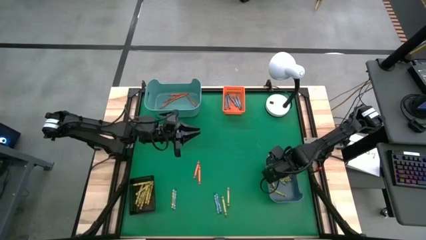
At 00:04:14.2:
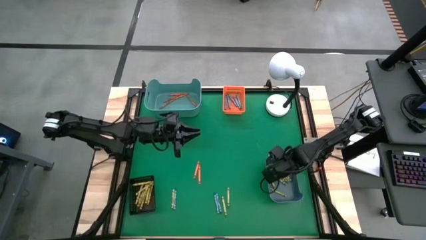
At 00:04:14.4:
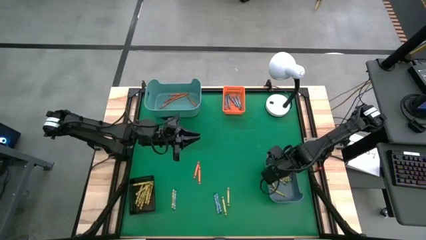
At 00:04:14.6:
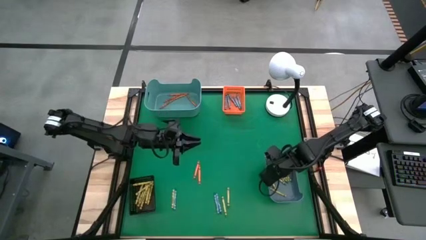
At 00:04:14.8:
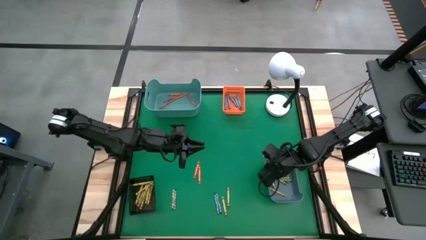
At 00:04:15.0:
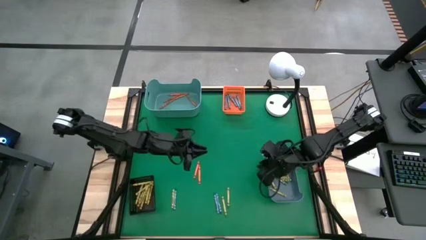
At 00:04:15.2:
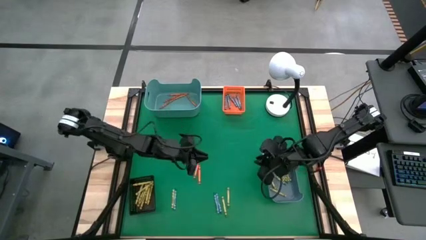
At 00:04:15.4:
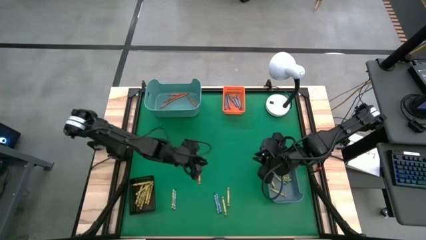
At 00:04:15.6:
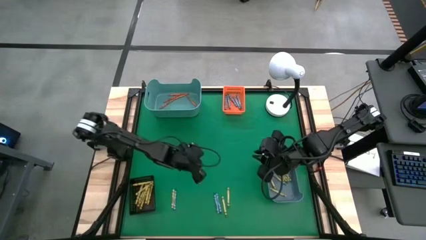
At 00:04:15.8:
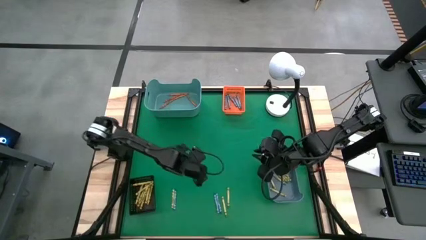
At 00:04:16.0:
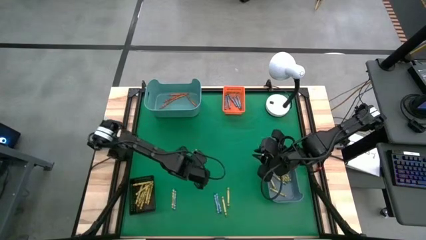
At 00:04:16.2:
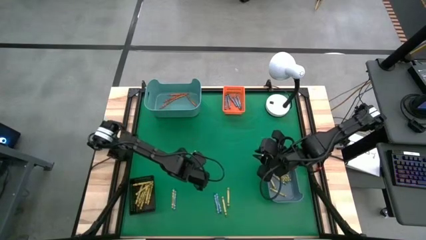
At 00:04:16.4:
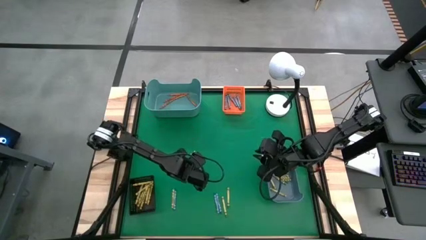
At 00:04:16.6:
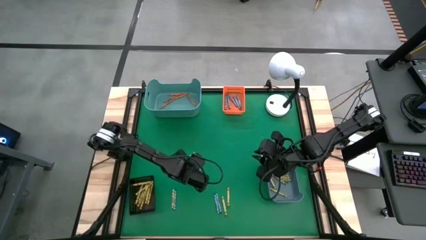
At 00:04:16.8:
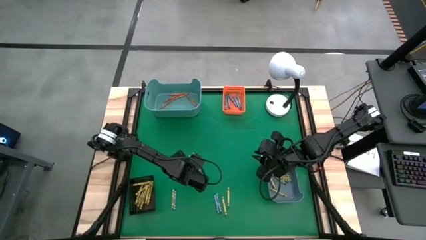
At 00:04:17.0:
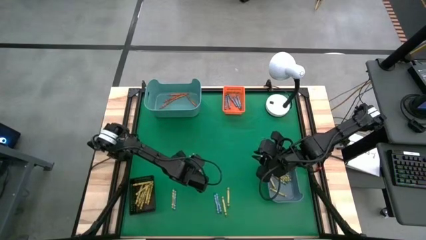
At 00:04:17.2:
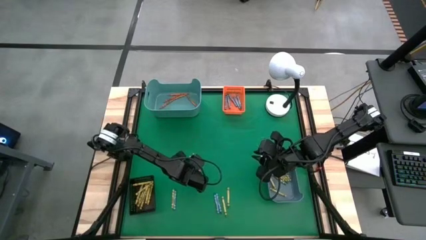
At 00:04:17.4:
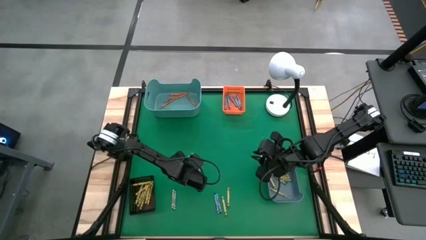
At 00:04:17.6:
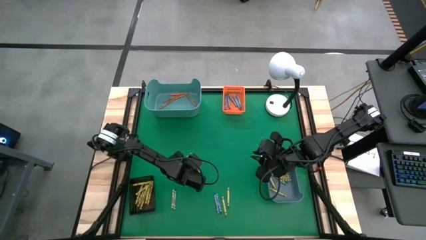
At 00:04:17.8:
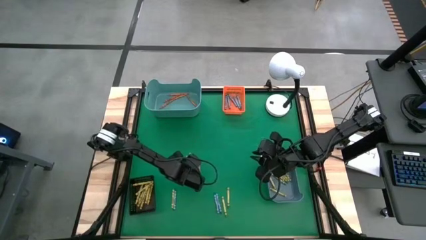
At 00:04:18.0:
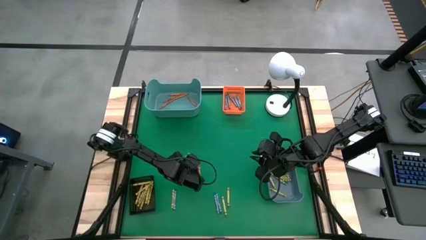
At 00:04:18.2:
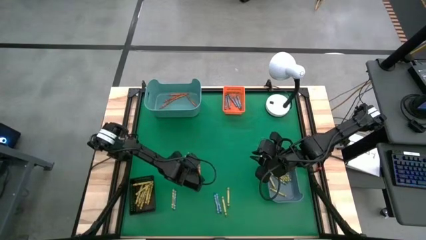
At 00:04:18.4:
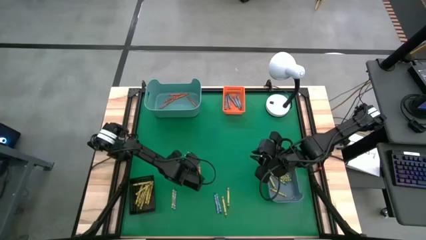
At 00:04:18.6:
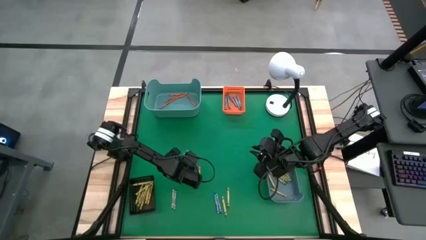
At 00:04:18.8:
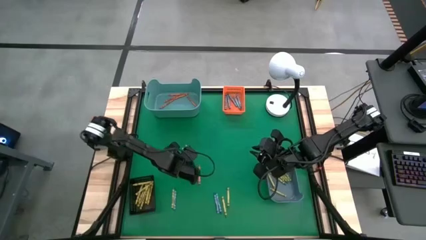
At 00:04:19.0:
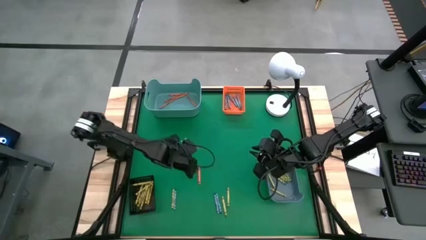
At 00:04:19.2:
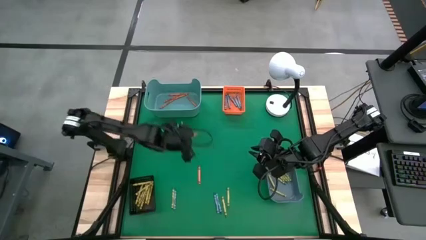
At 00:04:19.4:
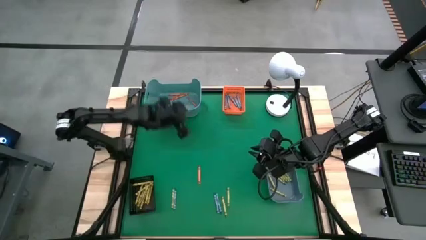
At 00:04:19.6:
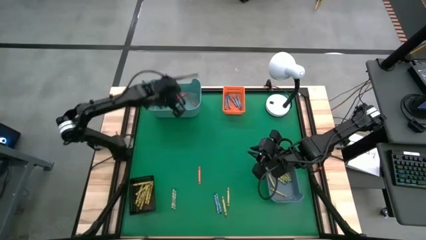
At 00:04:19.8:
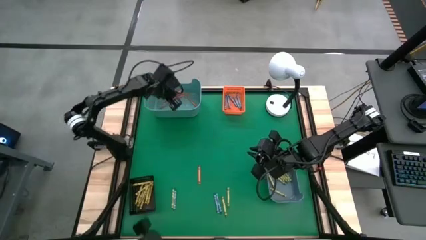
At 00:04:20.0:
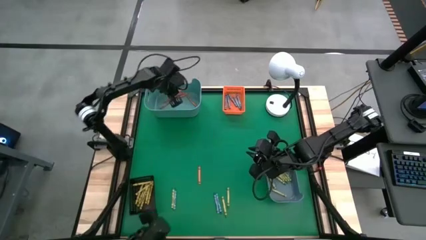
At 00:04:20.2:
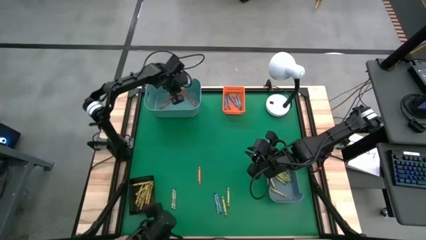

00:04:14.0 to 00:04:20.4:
Task: Sort crayons
Put the orange crayon into the green bin

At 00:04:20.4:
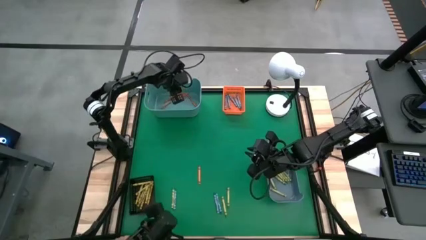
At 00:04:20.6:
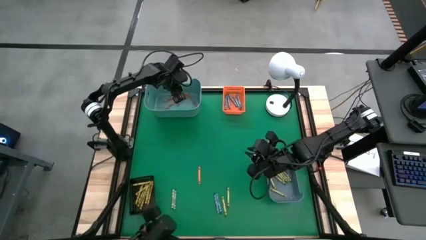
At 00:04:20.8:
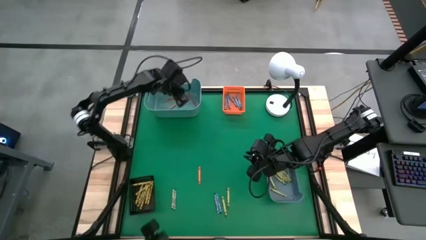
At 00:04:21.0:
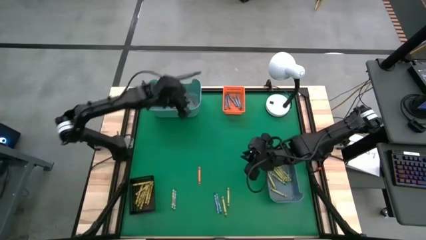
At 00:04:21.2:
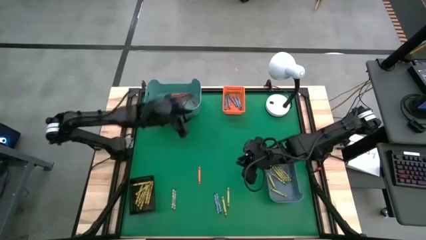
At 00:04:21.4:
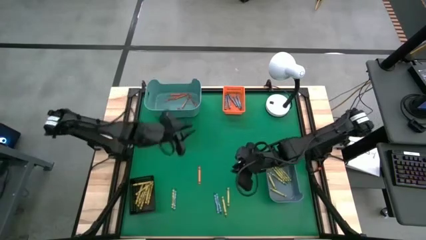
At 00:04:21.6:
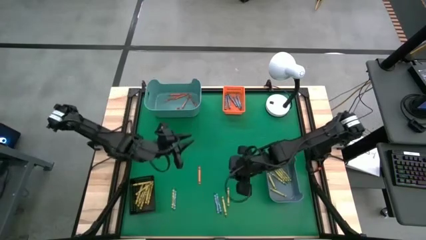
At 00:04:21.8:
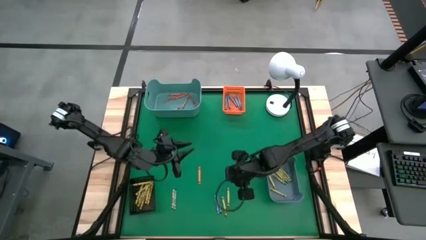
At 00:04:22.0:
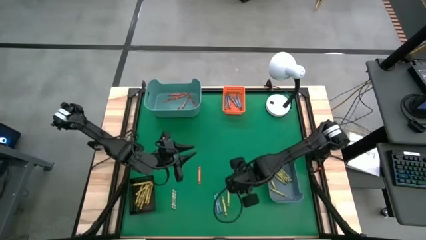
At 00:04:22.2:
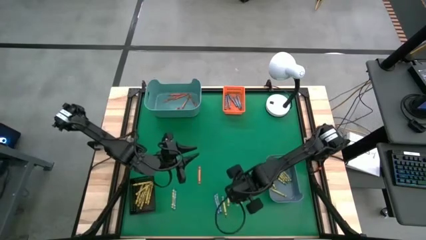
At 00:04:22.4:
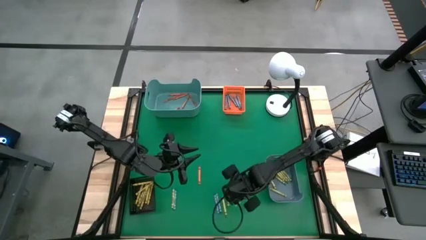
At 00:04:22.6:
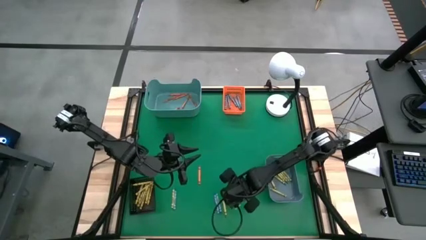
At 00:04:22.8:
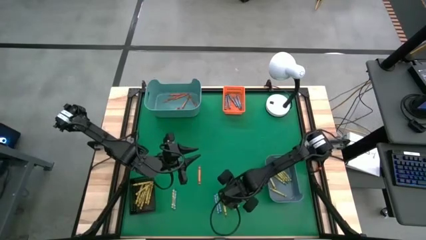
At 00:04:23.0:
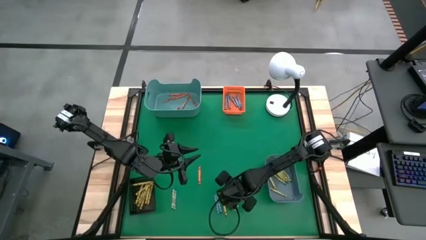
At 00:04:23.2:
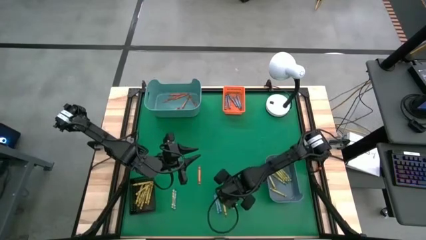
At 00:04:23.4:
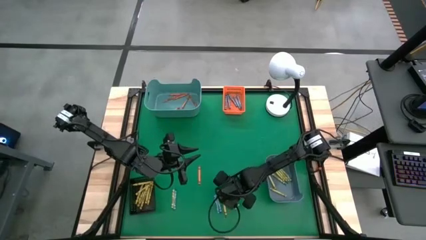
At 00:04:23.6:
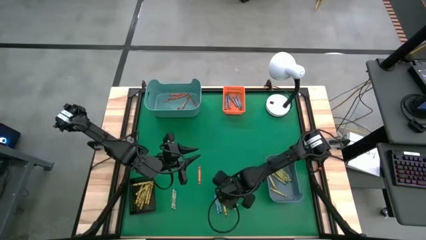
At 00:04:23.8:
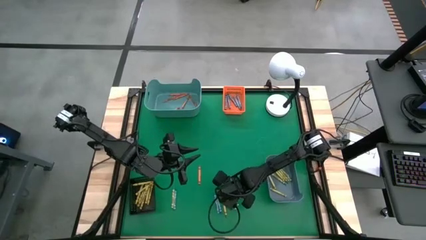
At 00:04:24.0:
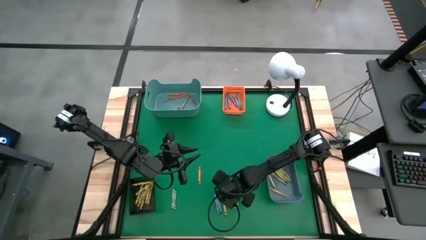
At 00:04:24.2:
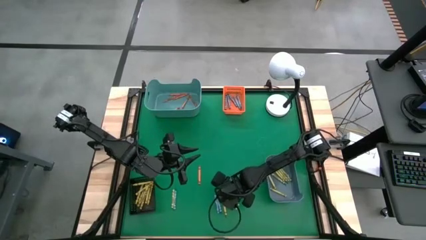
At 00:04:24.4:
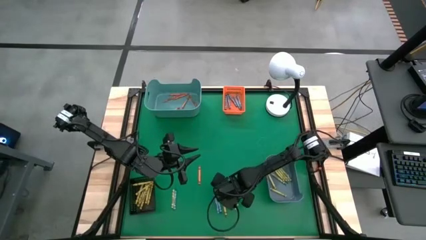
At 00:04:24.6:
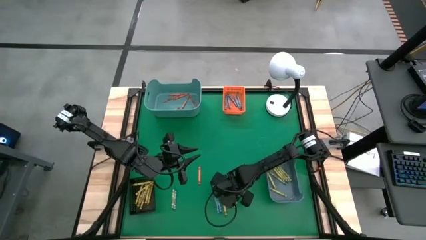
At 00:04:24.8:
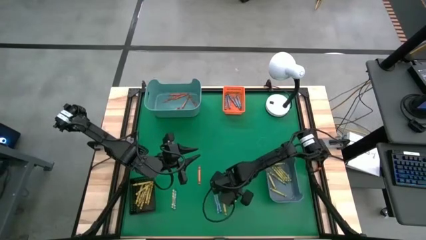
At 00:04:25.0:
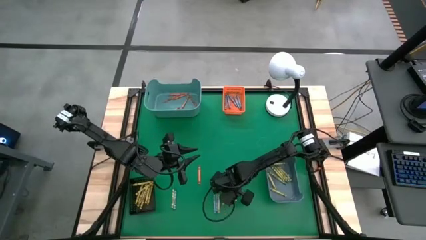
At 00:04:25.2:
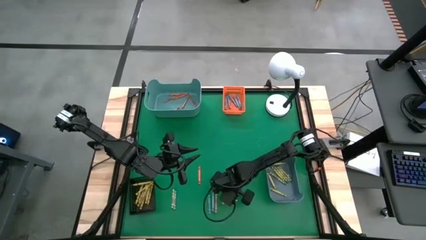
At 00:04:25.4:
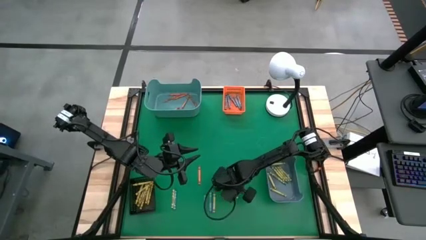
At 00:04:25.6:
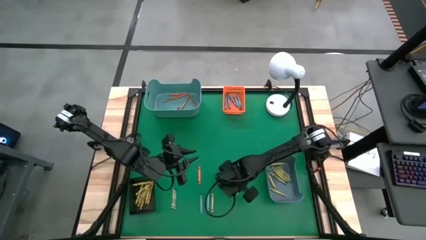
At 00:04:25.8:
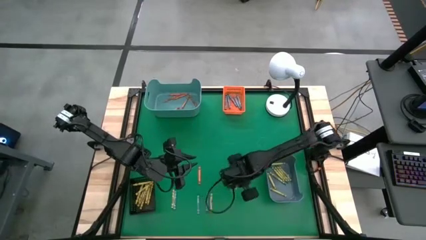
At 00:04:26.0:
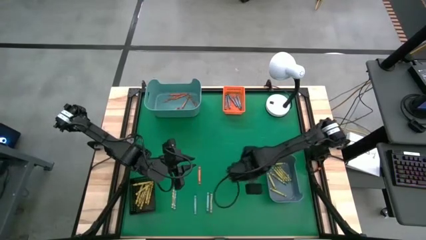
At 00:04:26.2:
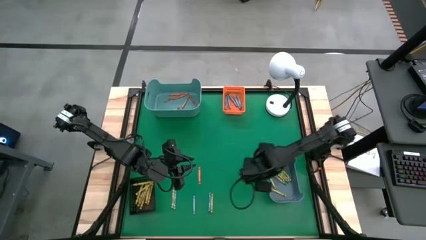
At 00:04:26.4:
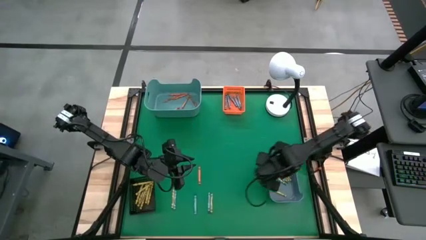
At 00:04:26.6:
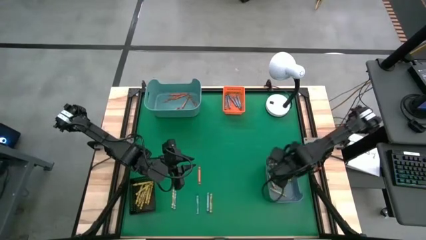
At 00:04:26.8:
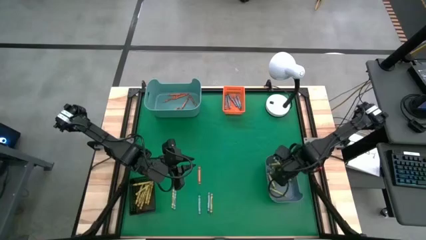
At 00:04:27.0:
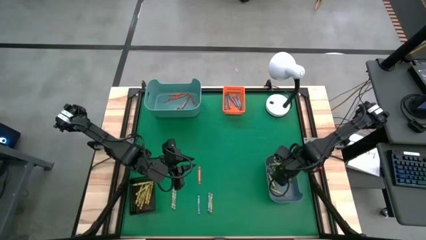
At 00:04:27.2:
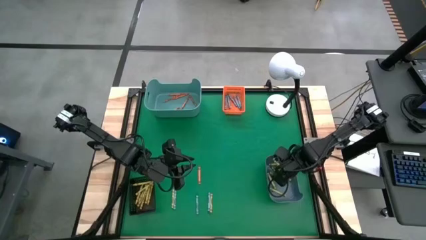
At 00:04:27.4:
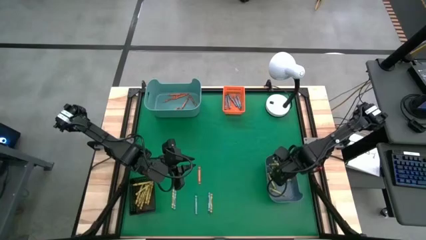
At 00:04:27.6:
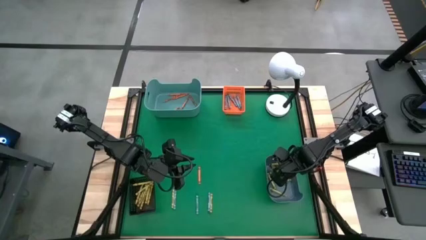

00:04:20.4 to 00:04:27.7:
Put the green crayon into the blue bin

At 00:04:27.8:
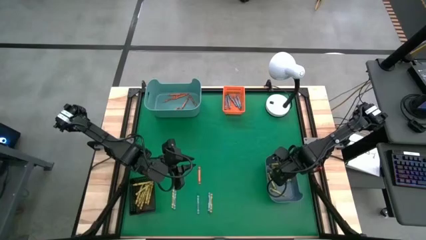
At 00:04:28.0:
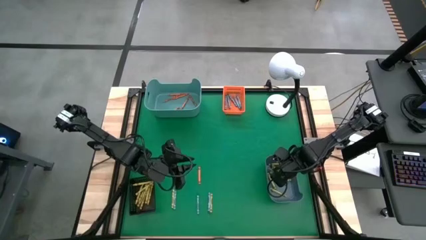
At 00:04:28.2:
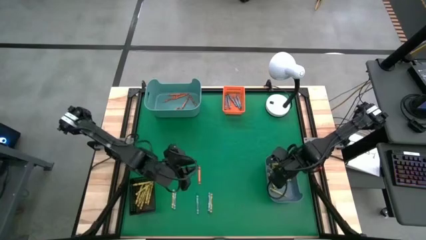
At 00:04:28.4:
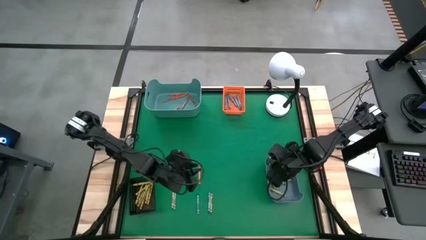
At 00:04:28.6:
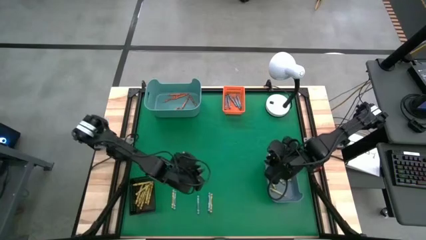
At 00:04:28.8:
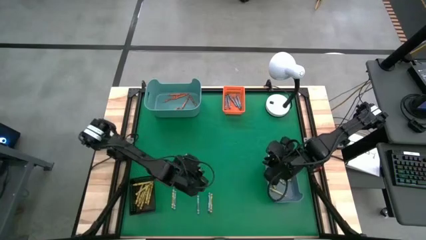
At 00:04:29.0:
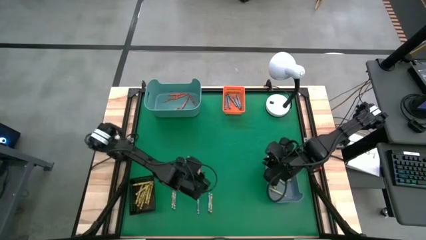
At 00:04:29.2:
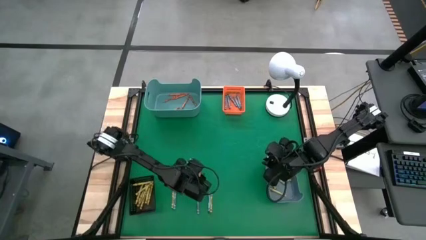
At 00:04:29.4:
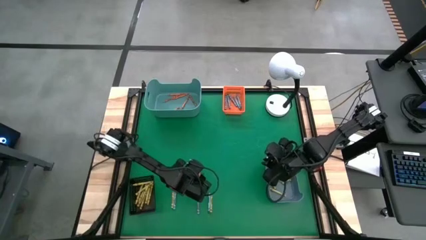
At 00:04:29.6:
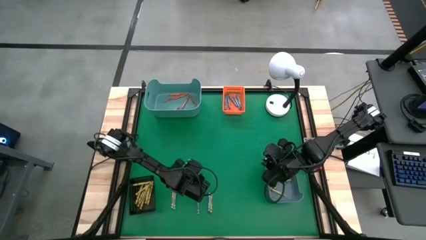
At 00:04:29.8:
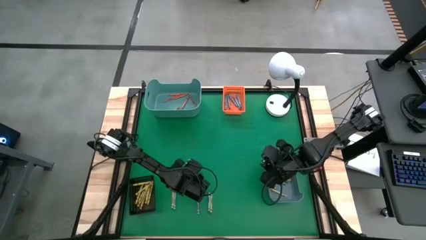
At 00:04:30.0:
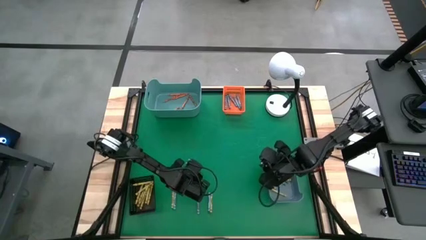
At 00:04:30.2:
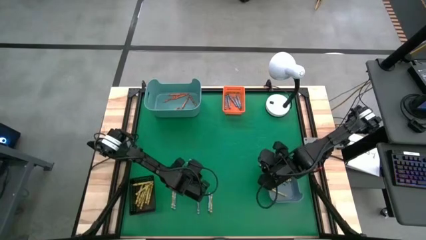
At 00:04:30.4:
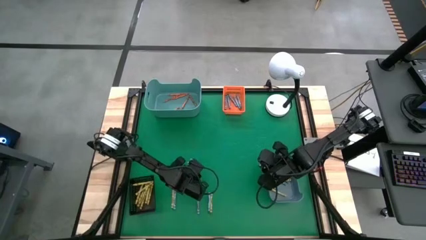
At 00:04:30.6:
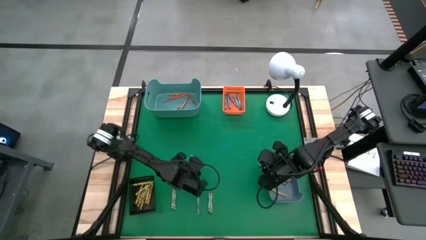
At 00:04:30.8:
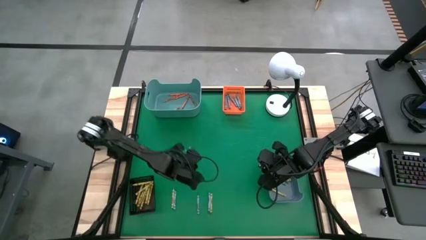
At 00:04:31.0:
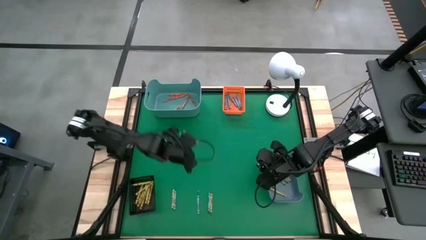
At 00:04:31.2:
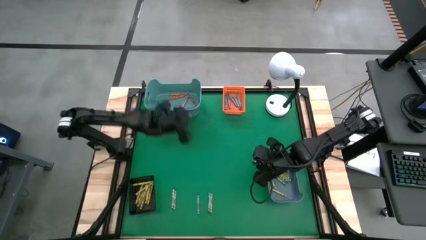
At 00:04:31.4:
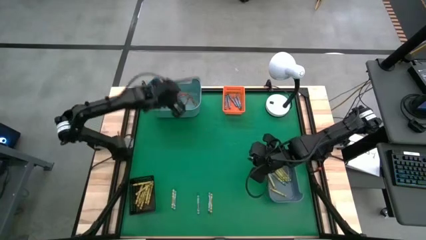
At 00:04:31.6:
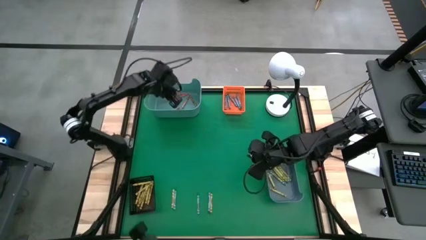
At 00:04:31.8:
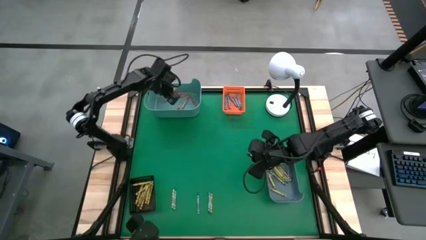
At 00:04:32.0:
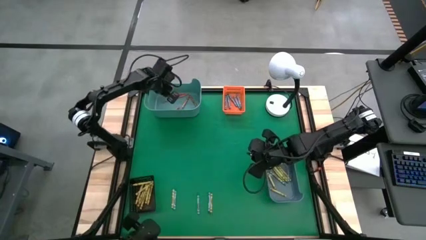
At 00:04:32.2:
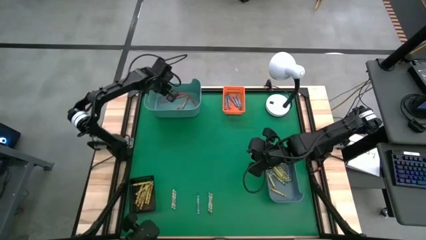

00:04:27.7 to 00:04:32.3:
Put the orange crayon into the green bin
